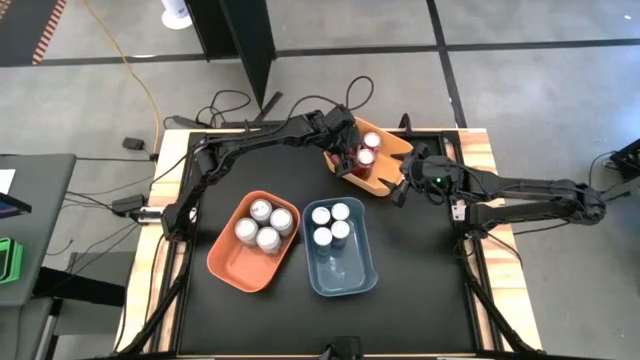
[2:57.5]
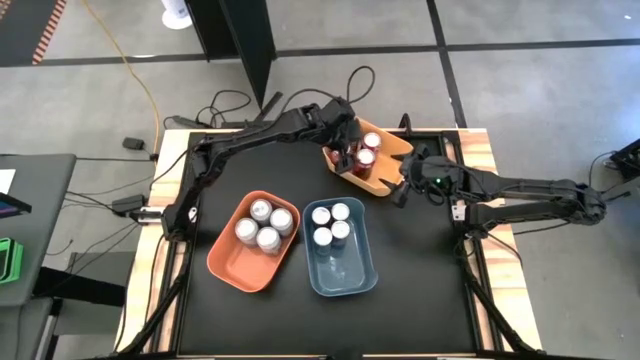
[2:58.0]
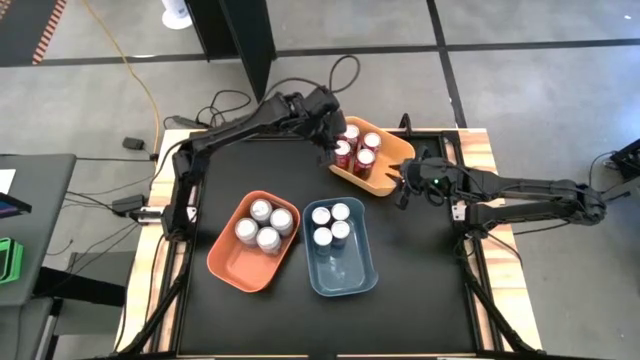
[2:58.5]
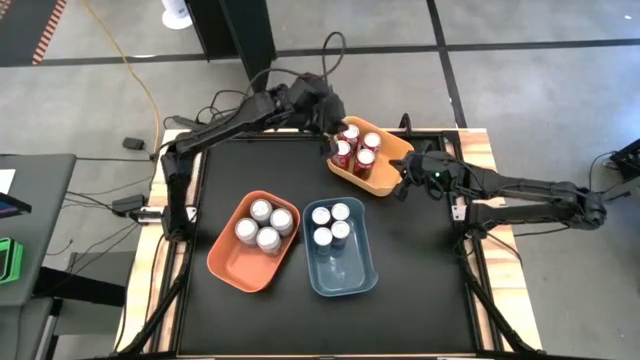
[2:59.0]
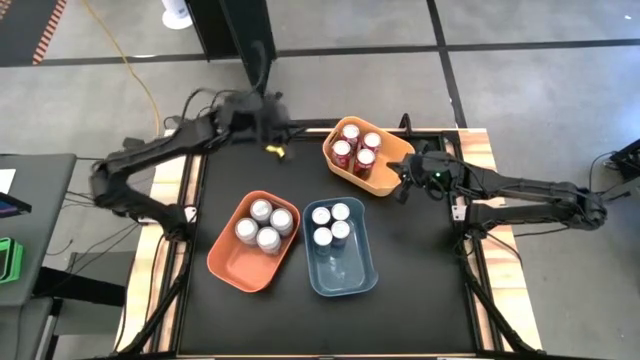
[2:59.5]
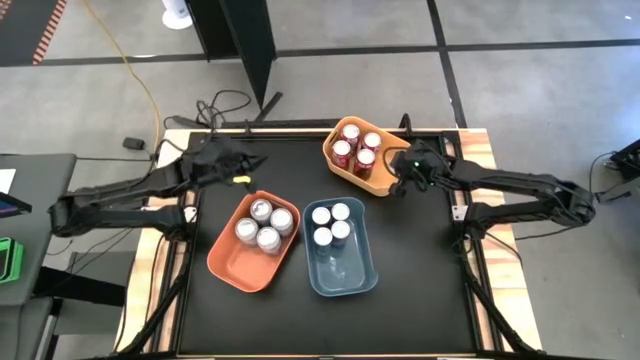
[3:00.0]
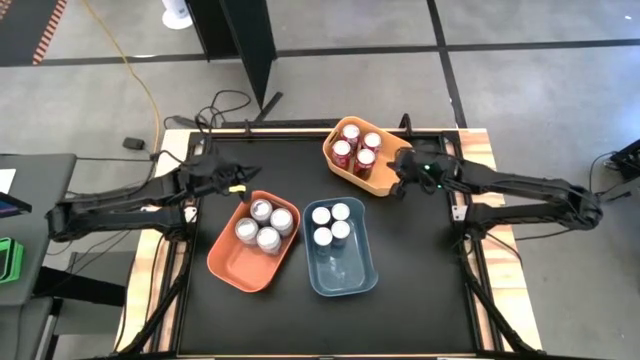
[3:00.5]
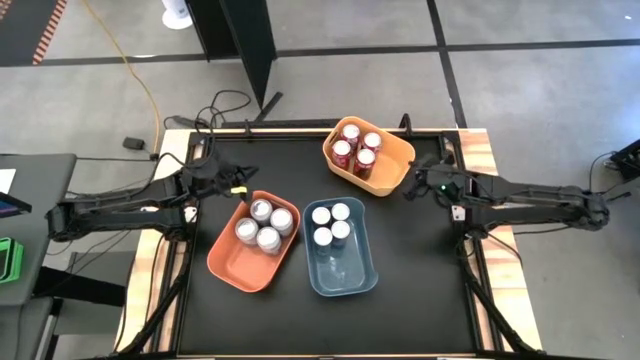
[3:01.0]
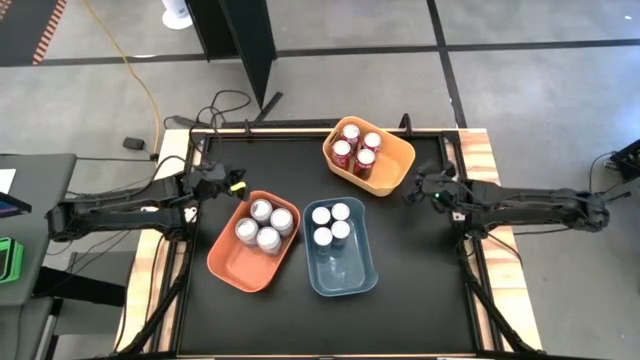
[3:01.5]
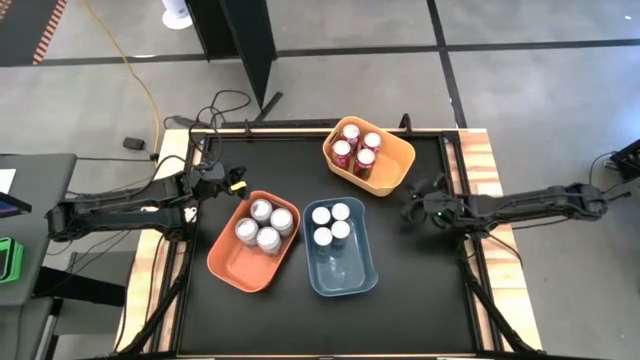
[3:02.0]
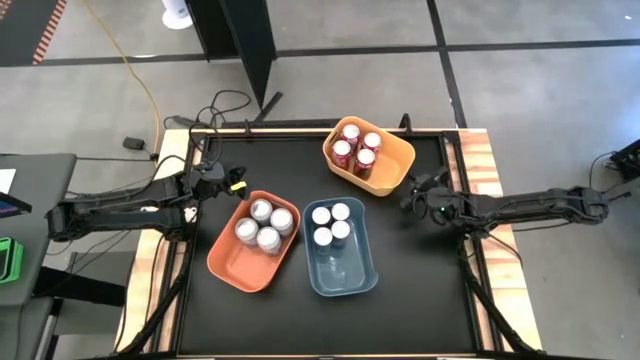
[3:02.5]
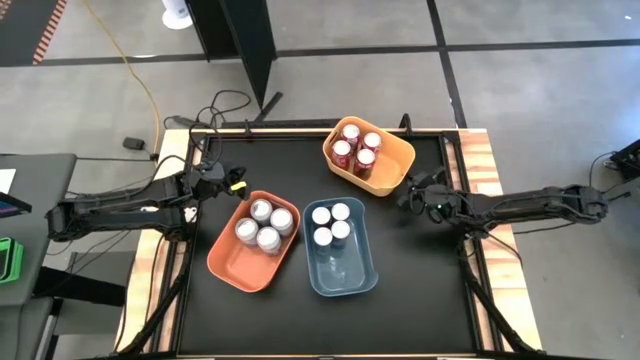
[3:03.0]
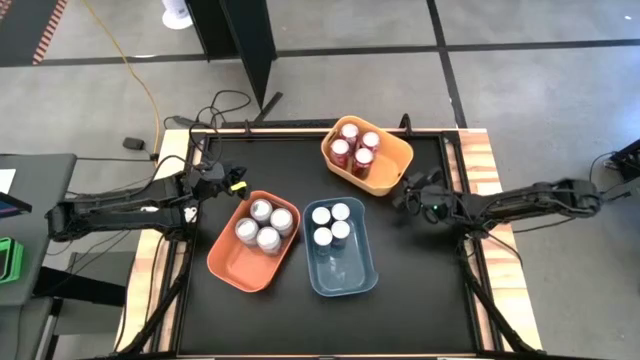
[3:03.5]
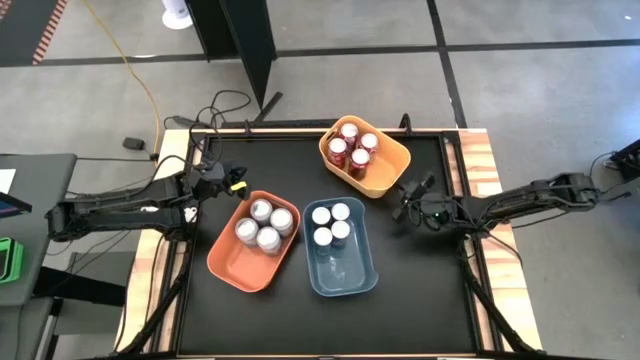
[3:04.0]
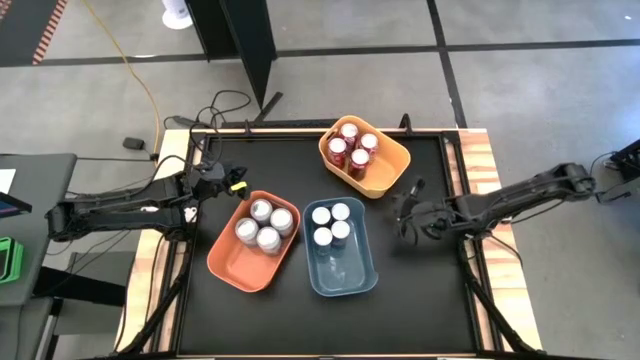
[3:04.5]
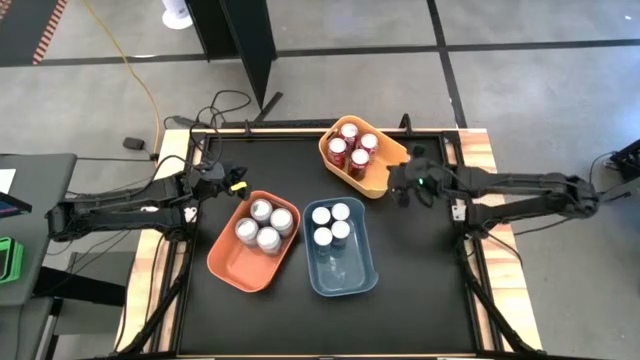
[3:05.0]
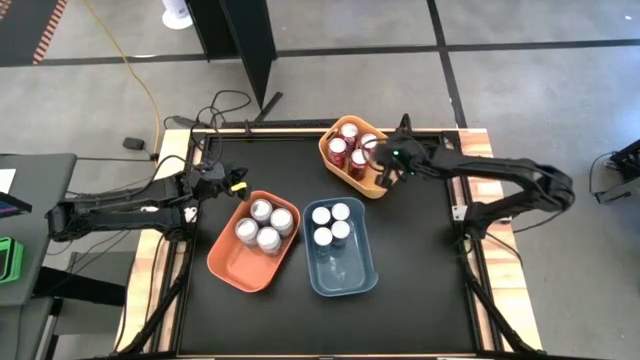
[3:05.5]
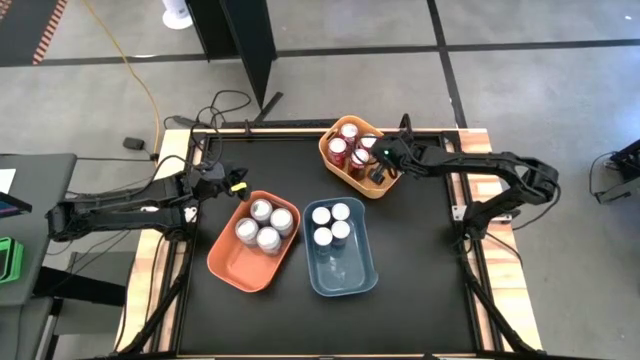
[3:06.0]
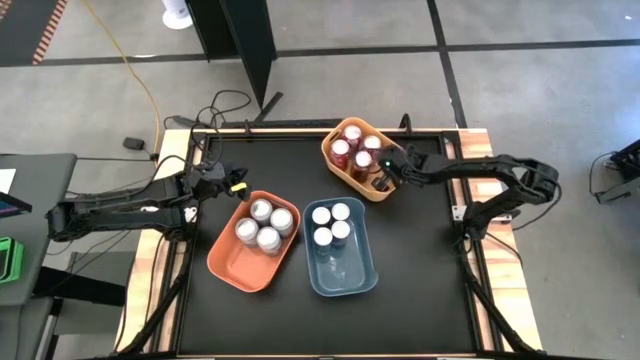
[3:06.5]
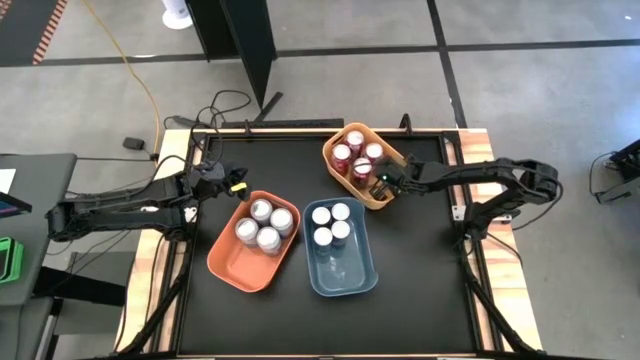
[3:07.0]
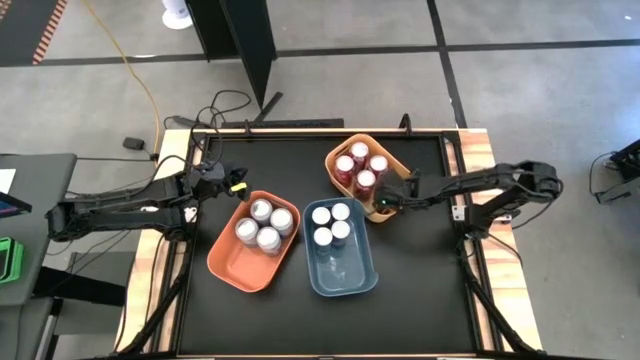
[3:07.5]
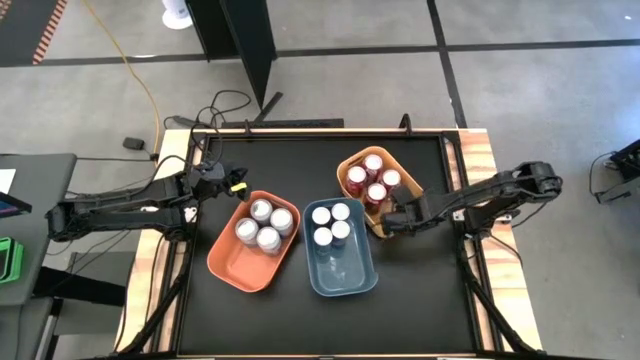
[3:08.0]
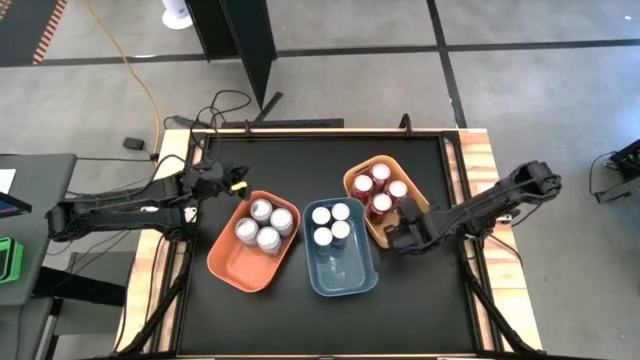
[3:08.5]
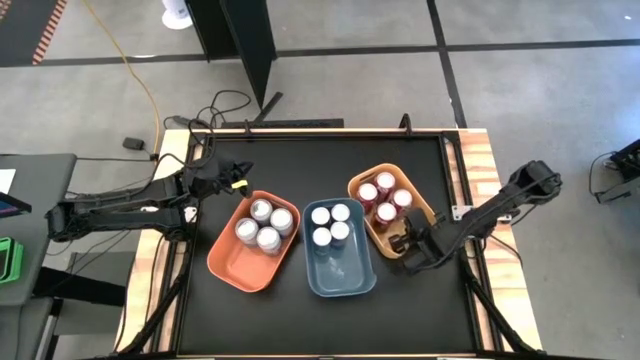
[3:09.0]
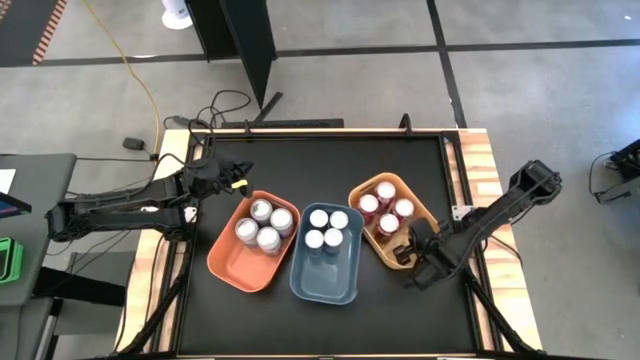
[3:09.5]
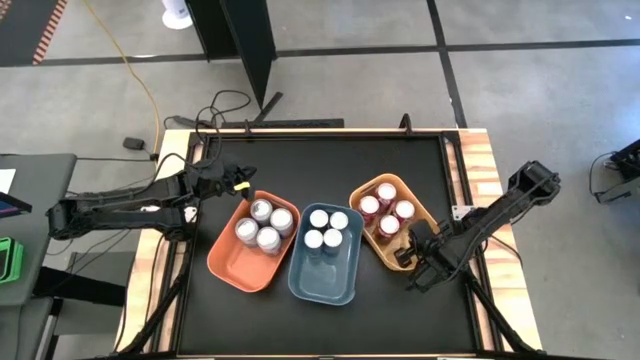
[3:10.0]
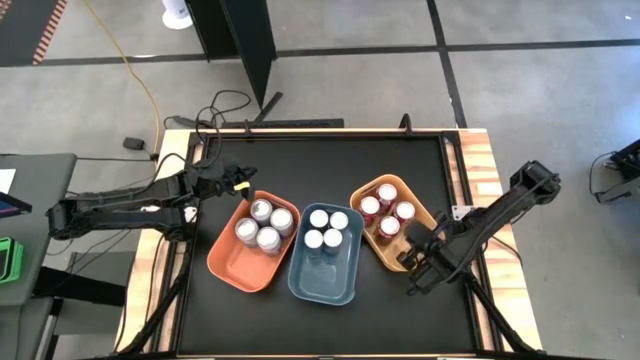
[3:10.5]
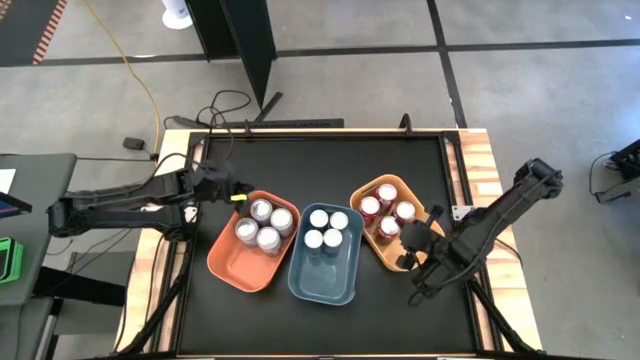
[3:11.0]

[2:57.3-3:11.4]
Task: Sort soda cans
Adjust the bins to the center of the table

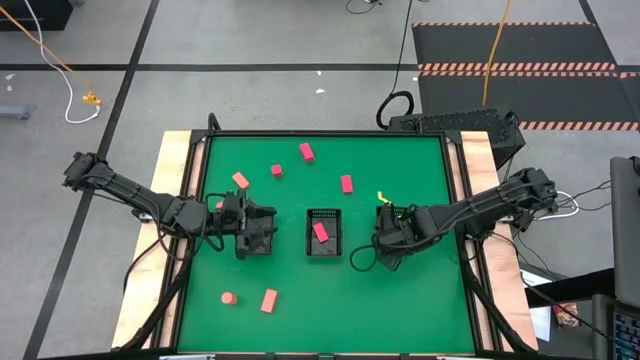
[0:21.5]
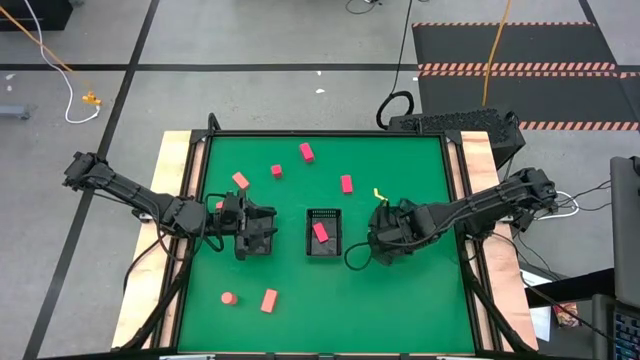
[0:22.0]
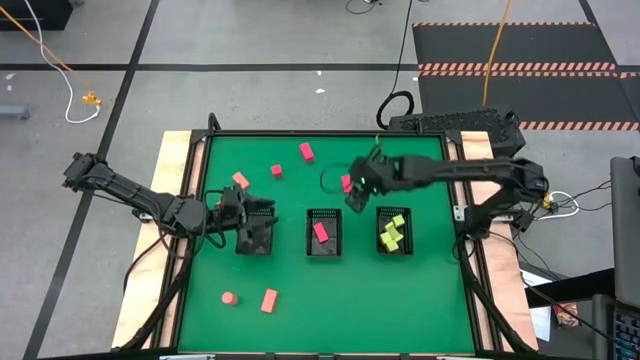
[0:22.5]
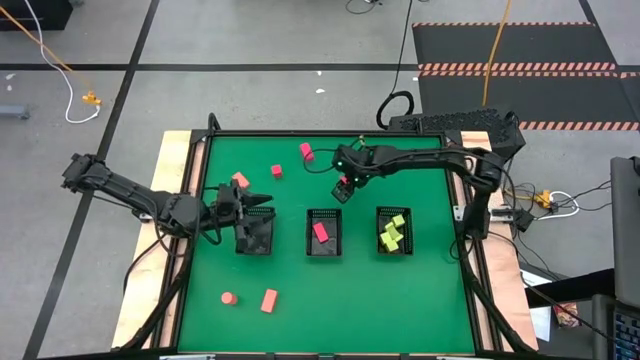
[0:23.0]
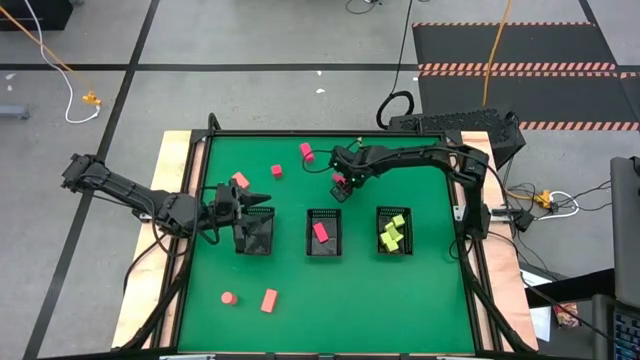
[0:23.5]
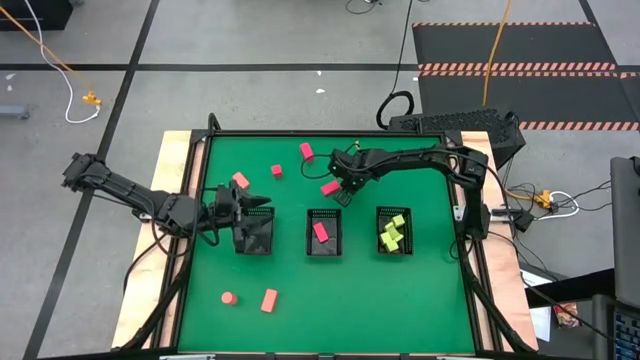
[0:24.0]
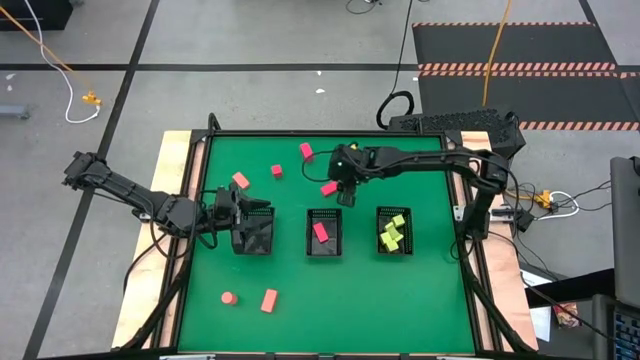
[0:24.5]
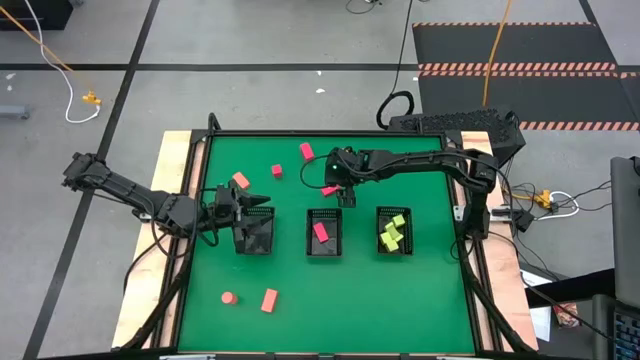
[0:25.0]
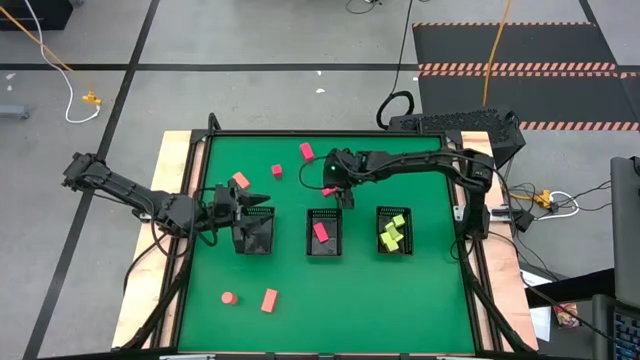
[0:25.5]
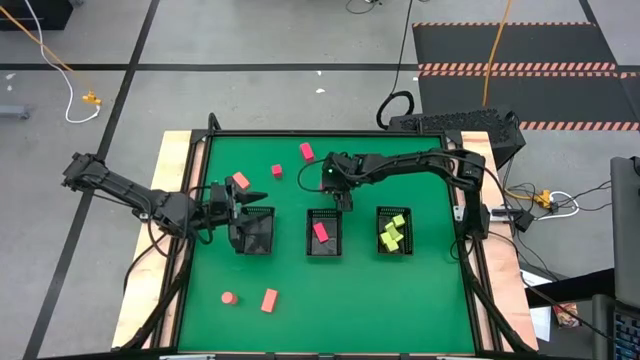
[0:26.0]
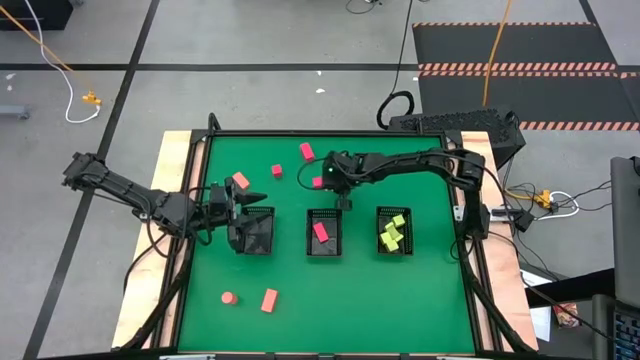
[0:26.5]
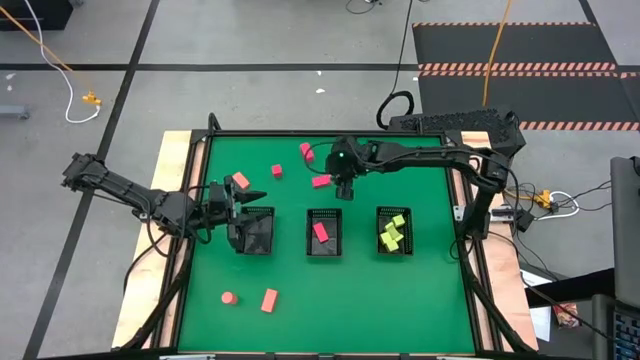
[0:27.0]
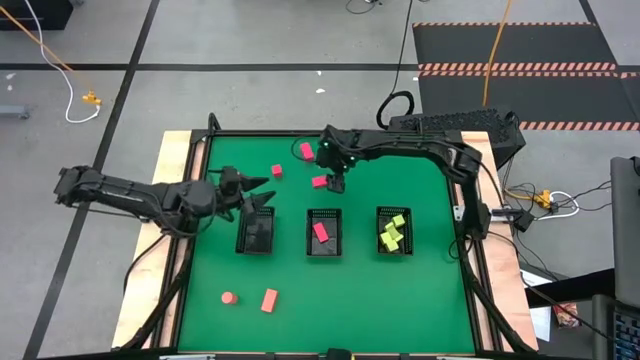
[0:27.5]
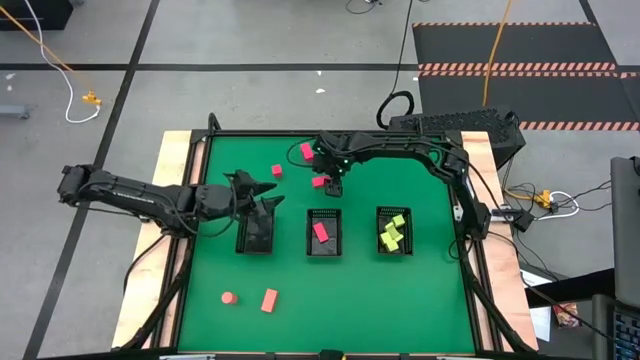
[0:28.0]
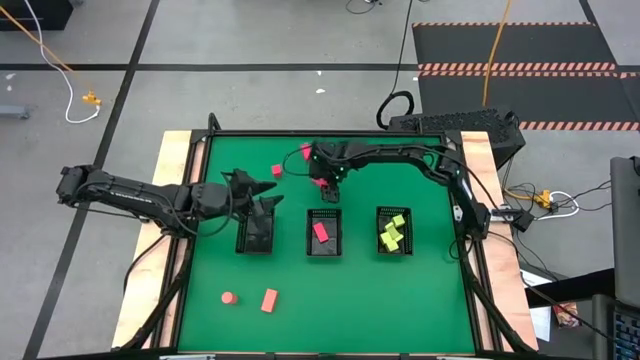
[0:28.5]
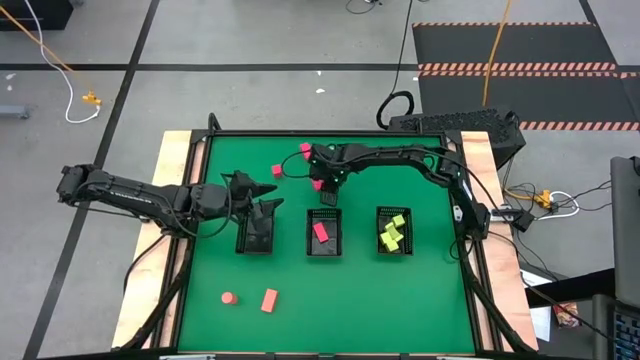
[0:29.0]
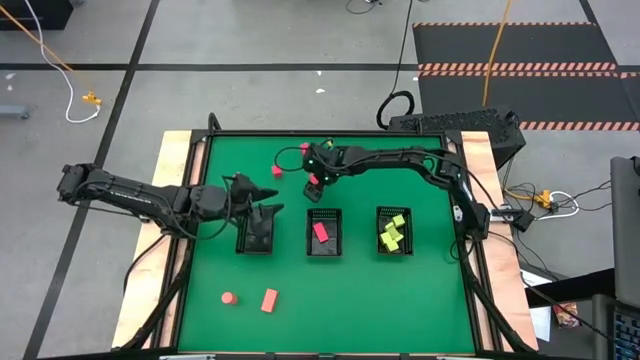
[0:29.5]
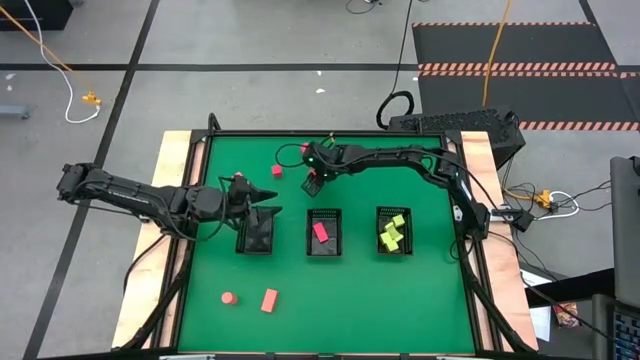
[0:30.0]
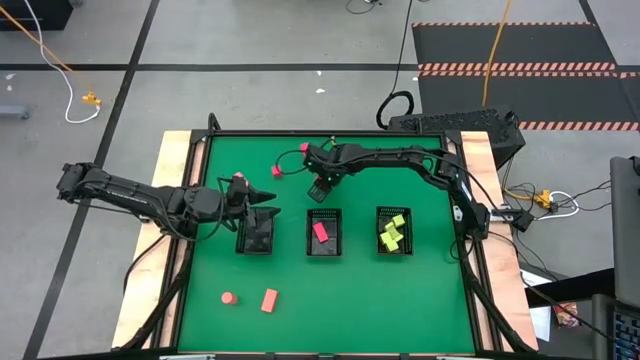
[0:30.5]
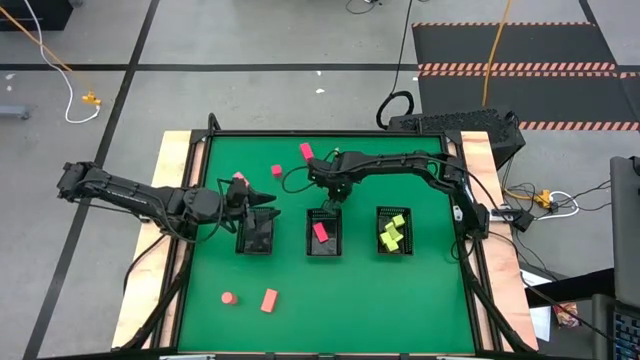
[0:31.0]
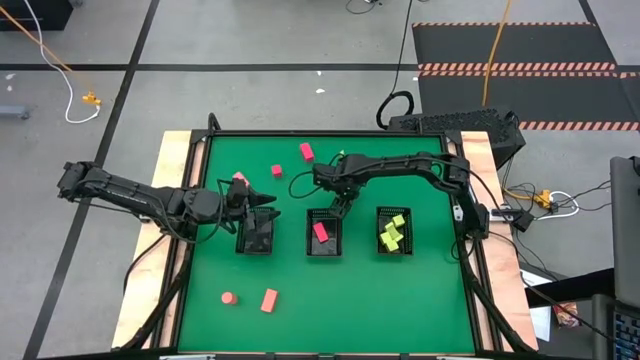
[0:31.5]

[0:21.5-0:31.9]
Task: Sort & place blocks by color
Put the red block into the middle black basket
